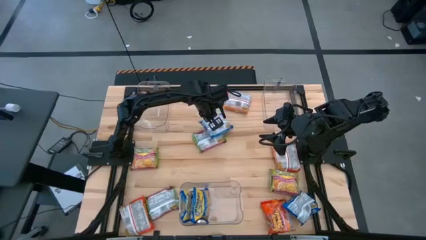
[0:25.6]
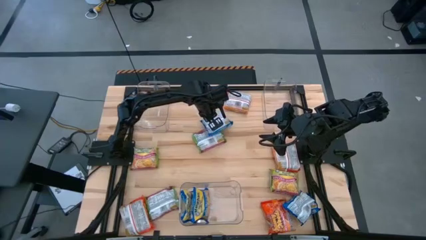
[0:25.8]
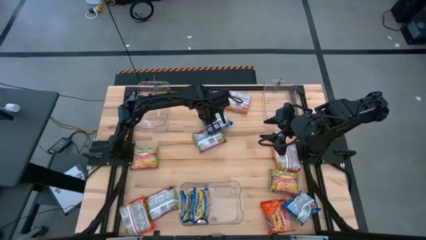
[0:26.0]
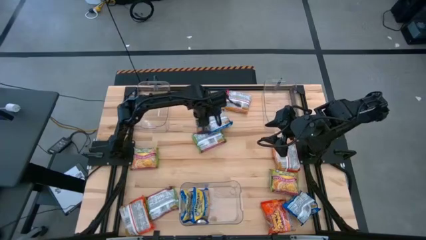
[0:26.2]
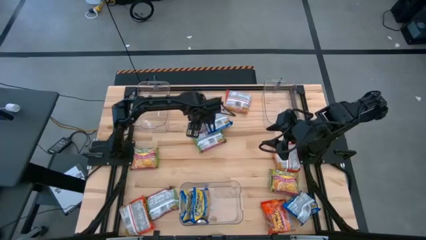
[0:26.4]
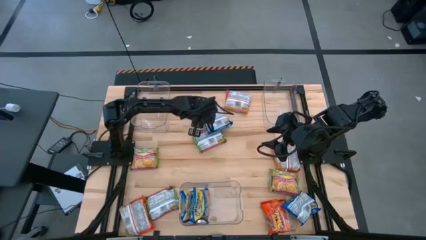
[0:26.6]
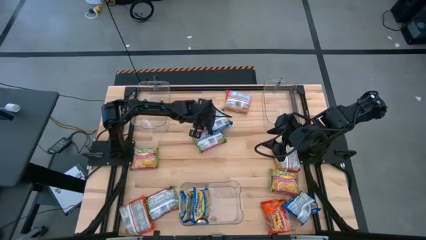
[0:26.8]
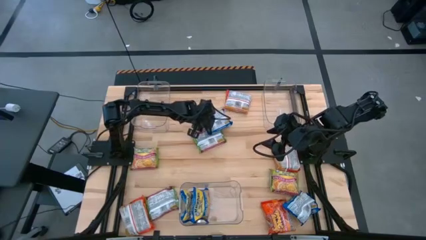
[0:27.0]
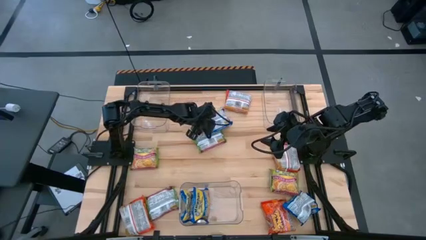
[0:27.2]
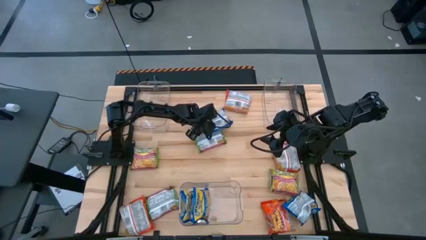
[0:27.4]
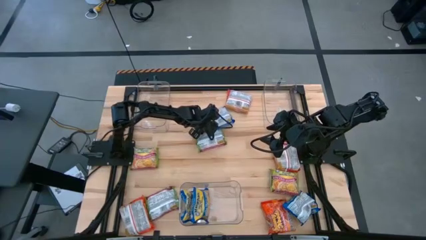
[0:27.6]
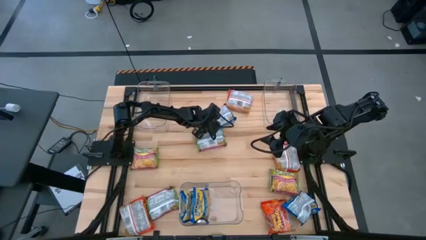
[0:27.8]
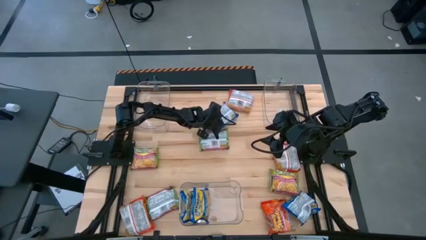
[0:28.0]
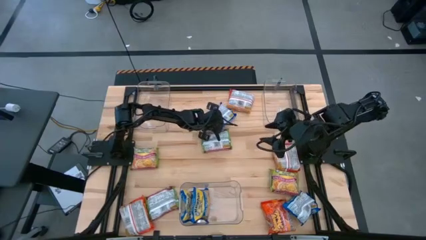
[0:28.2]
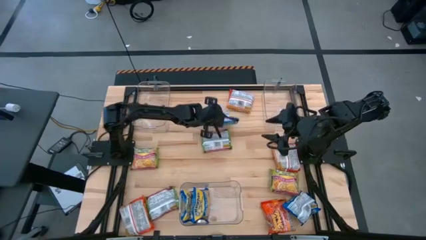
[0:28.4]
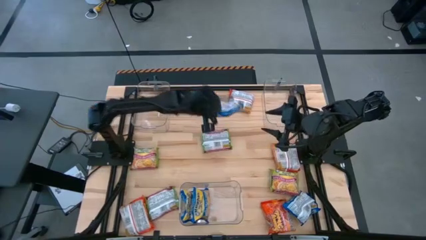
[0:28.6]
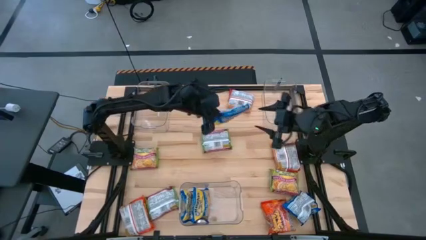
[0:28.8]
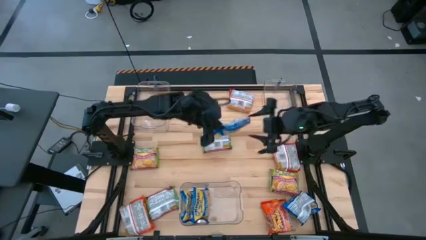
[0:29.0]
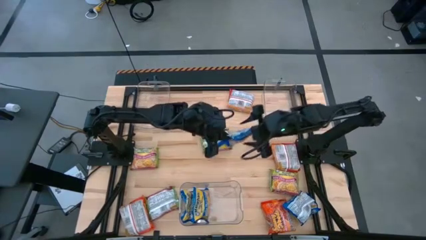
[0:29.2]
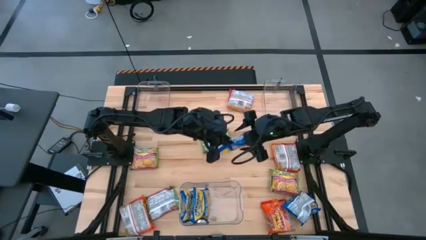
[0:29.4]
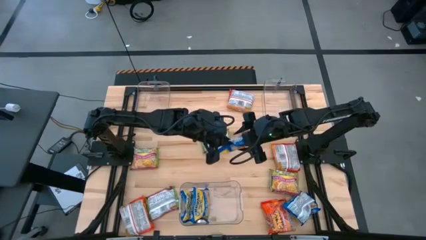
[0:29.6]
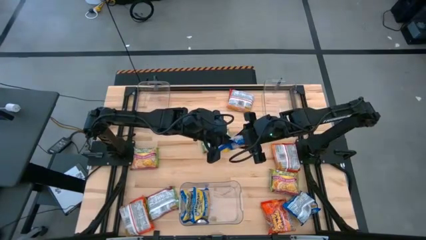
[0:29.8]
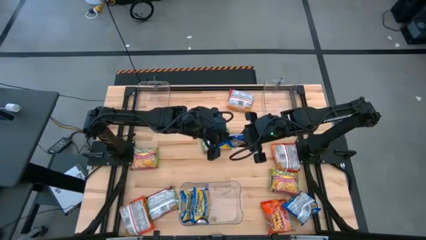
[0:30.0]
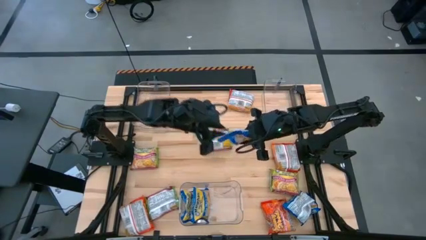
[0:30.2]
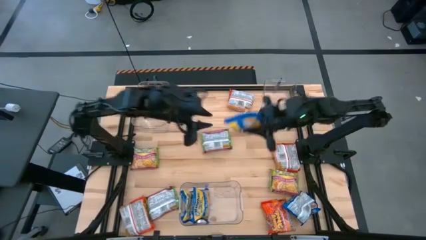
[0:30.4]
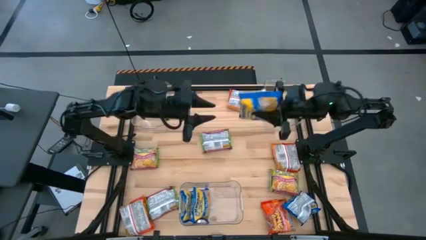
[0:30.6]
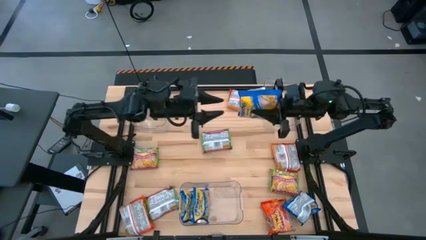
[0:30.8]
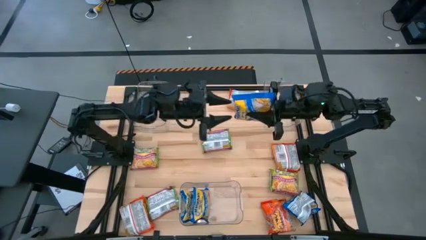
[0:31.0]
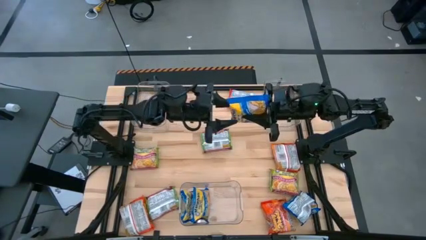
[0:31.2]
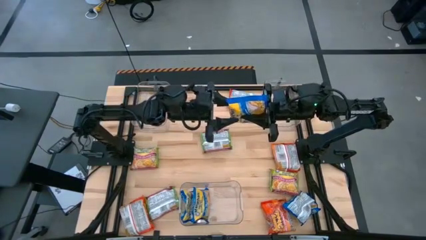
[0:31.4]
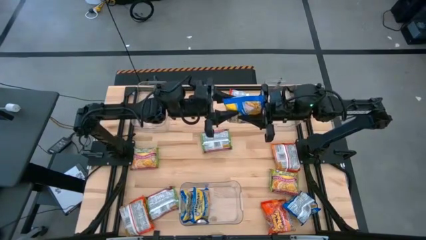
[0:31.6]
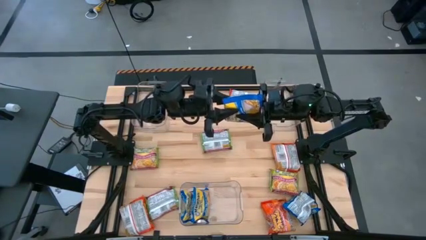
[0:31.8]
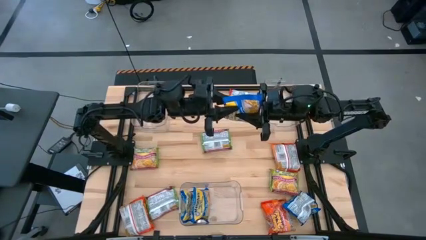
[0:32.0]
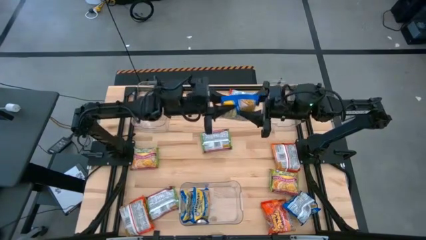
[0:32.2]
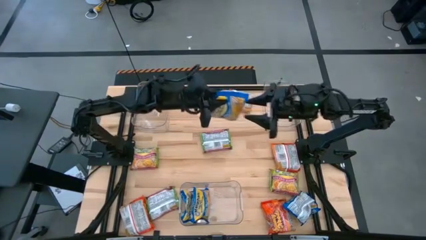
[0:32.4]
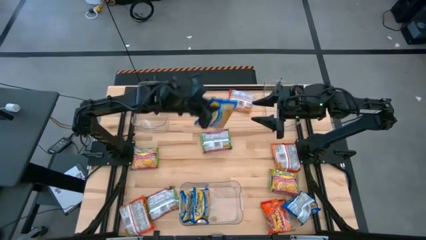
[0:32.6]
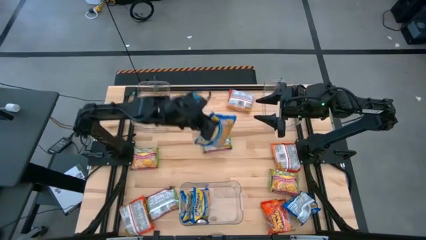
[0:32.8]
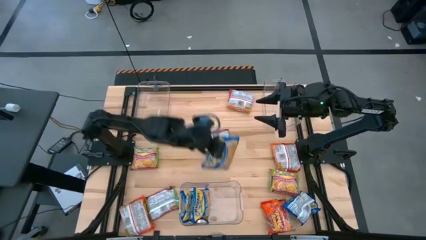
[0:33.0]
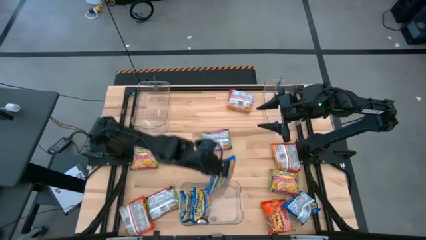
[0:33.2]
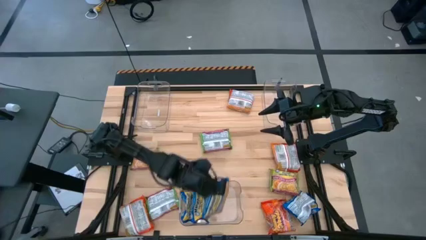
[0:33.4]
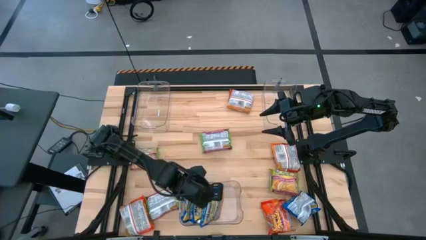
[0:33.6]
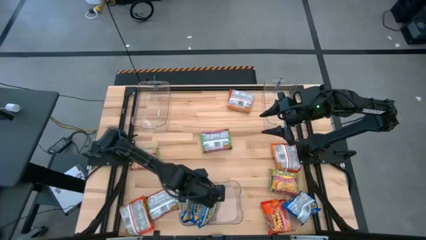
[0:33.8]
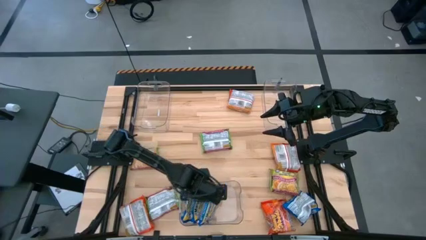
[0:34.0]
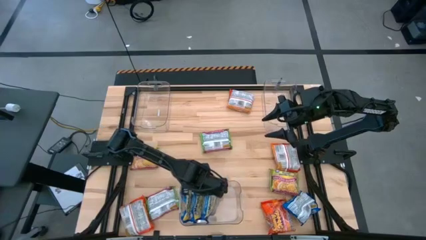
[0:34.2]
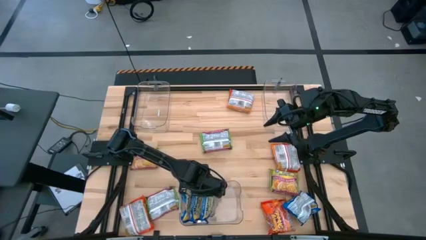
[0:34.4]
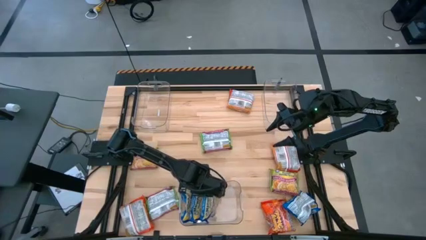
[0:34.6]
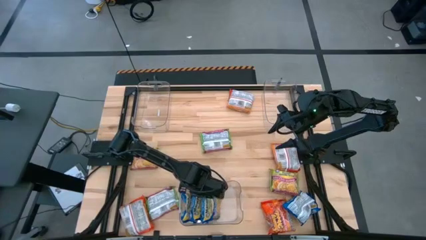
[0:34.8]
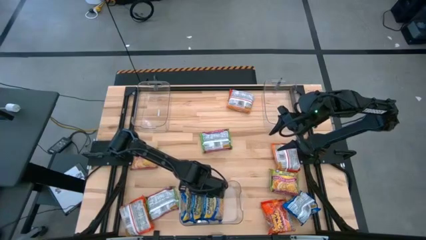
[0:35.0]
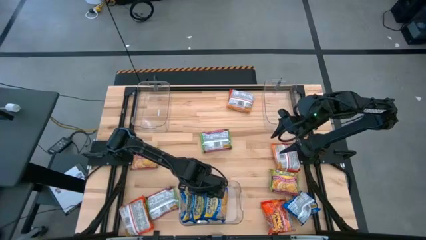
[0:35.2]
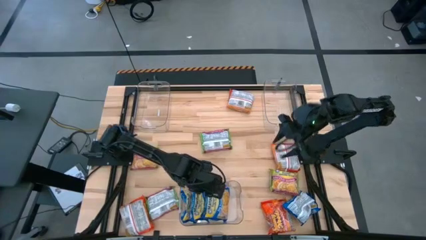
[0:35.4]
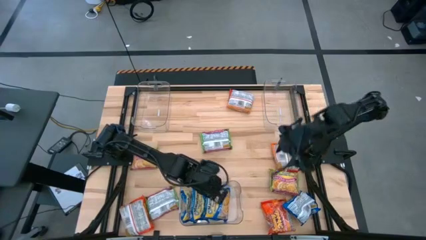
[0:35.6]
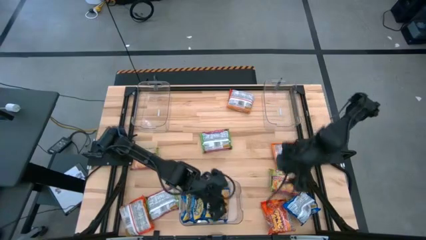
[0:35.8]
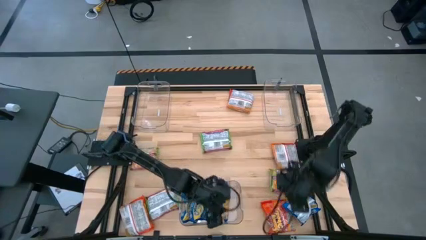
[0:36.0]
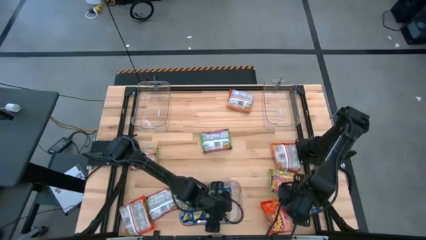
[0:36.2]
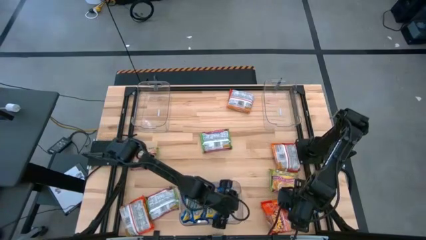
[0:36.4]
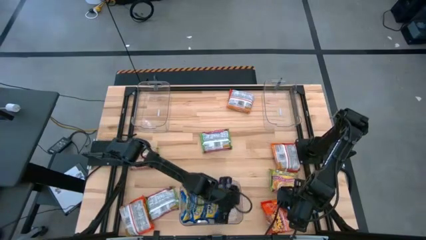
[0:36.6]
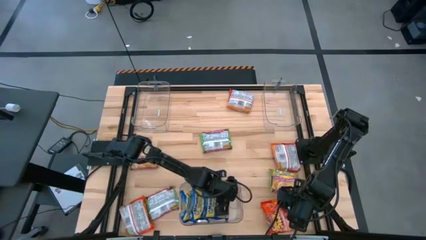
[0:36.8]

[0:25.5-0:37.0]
Task: Sort Maruchan noodles
Put the blue noodle pack into the bottom transparent bin

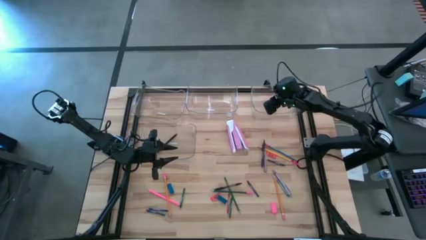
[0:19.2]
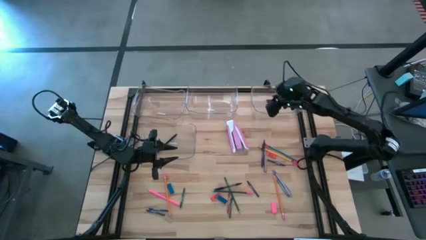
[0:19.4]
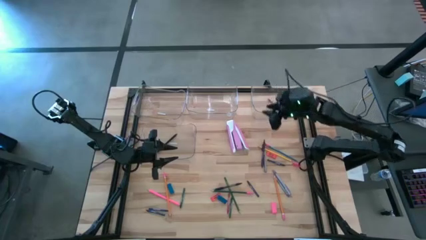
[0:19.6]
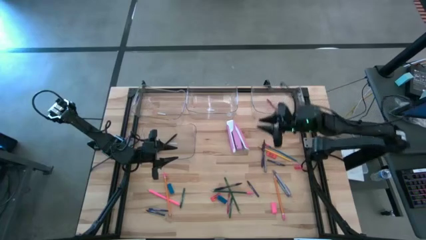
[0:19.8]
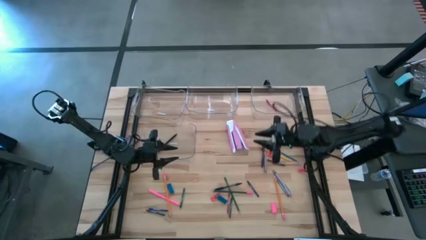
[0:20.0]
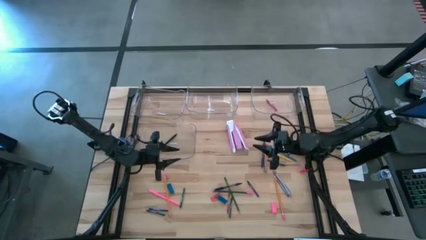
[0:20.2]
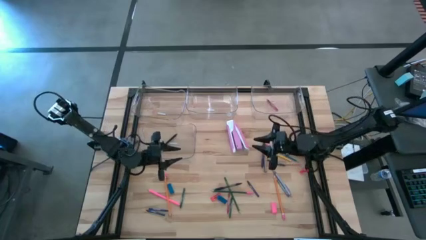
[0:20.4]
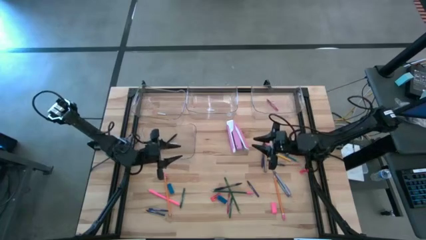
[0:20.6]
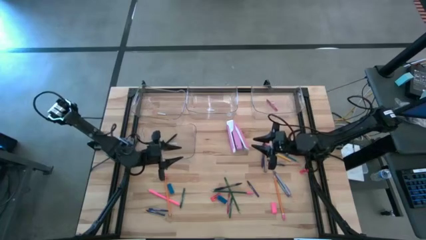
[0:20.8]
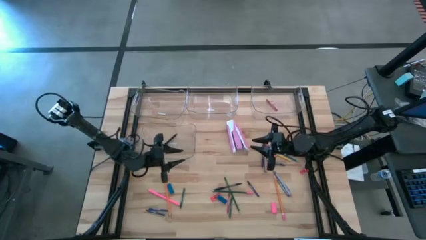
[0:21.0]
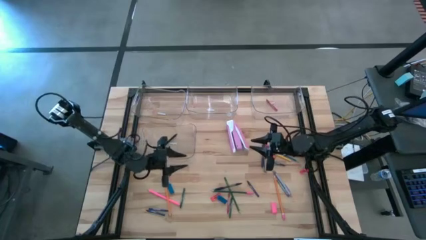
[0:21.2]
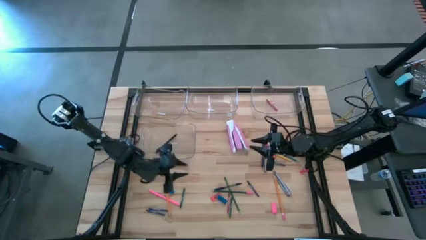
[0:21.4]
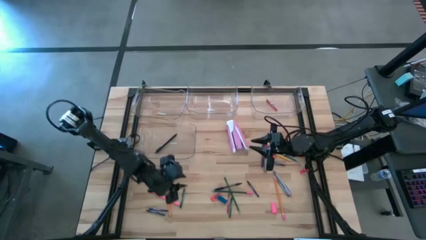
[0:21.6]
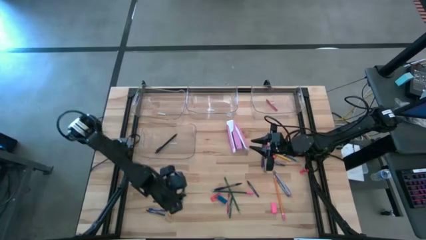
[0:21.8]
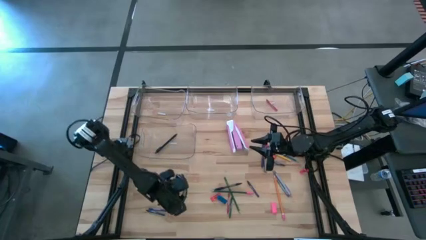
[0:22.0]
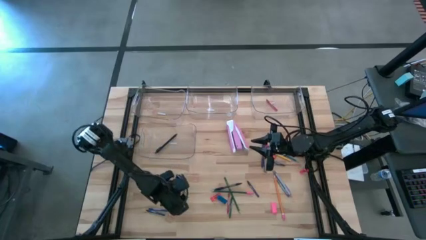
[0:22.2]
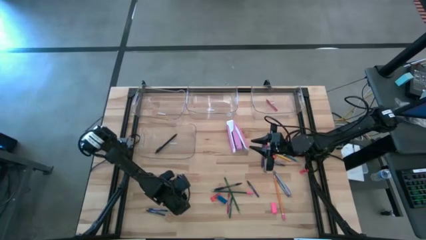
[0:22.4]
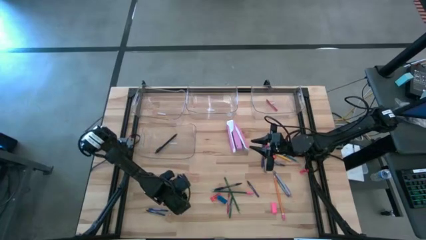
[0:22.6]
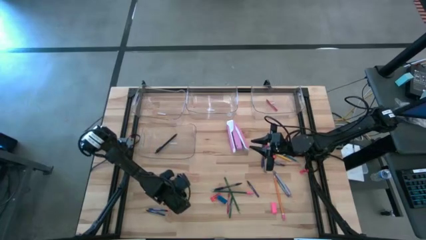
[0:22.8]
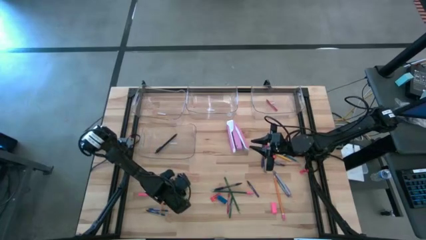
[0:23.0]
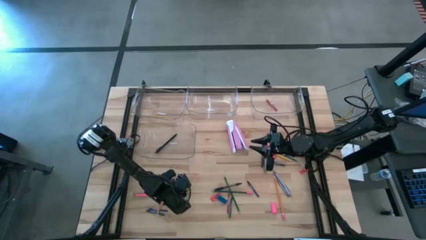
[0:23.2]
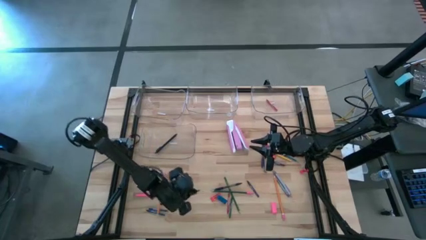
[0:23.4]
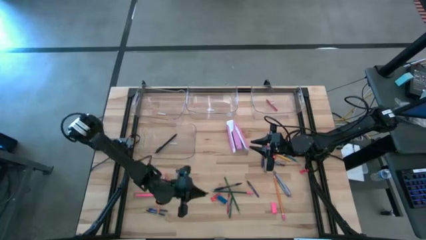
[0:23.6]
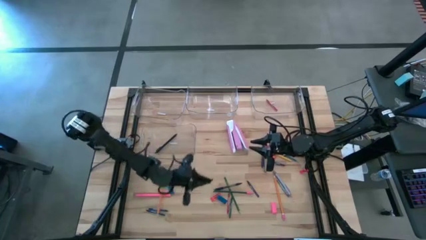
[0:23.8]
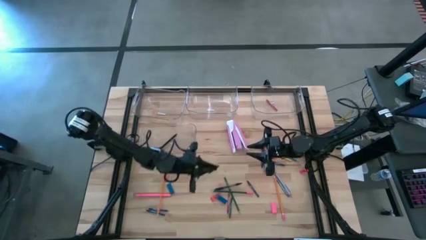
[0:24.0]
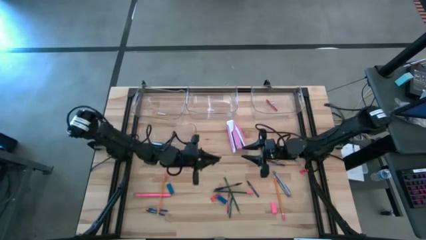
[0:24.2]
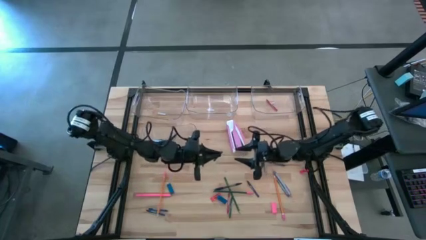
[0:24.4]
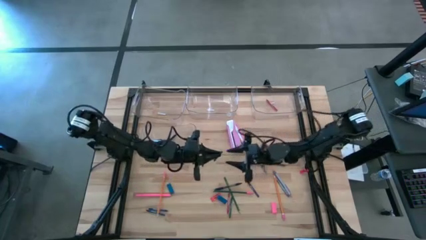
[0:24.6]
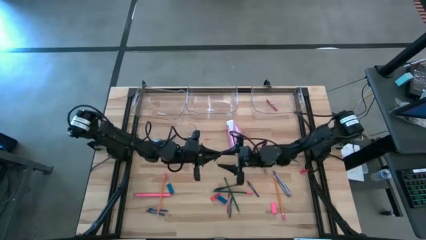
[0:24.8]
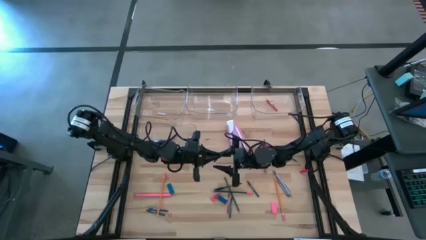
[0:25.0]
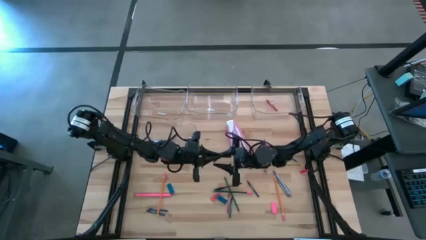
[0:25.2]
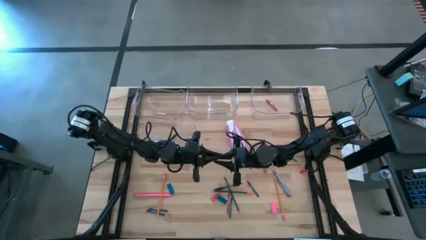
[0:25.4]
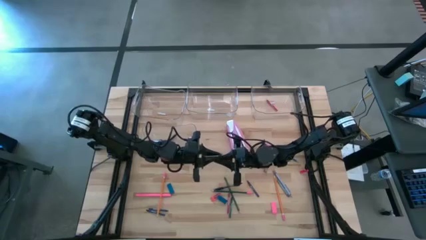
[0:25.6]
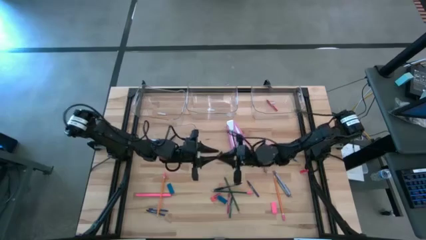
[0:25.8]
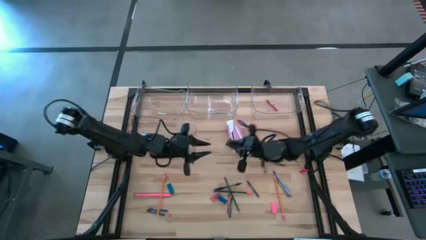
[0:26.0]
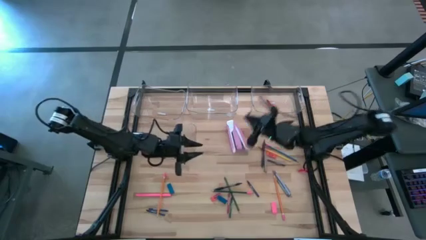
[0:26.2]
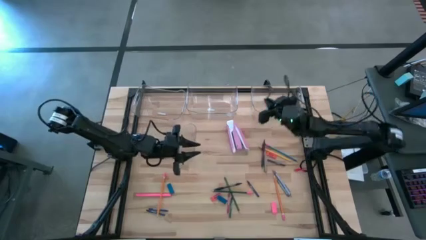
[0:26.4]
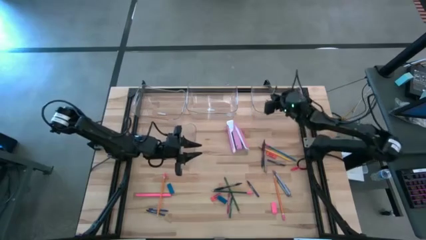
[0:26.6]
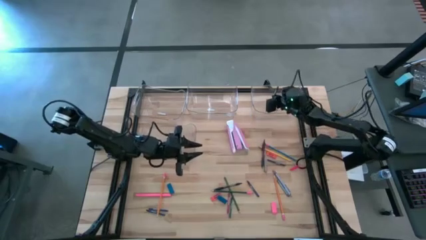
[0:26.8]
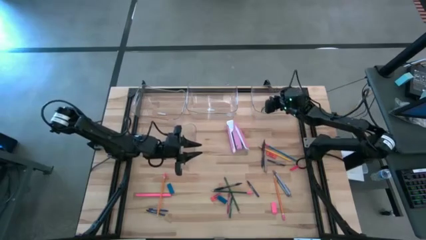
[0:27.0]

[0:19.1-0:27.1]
Task: Sort crayons/erasers/pens/pencils in bins
Put the green crayon into the top right transparent bin
